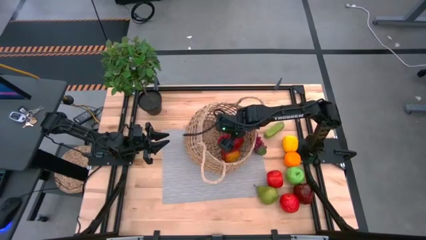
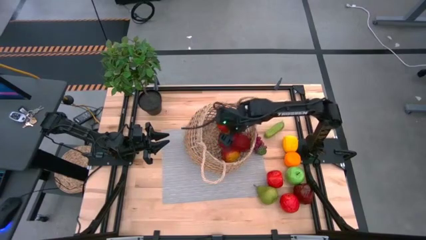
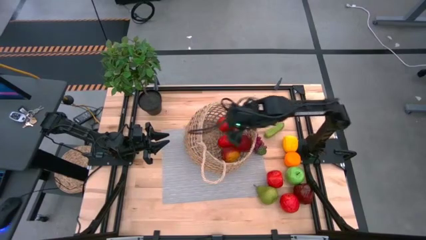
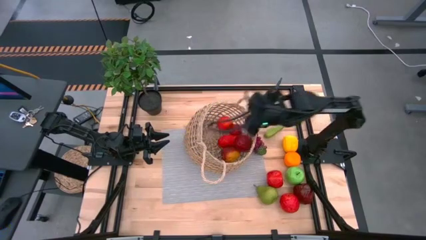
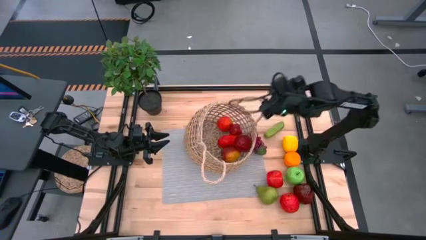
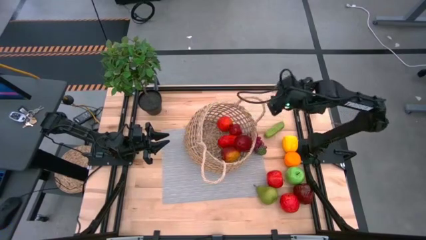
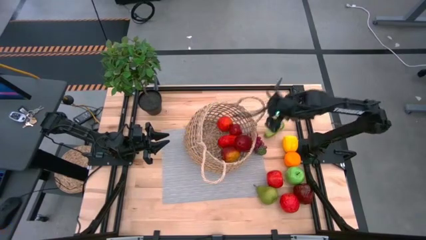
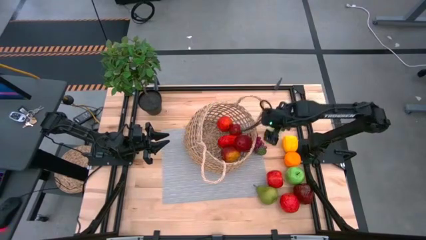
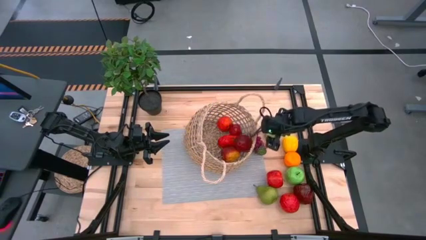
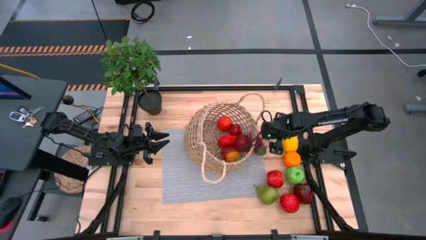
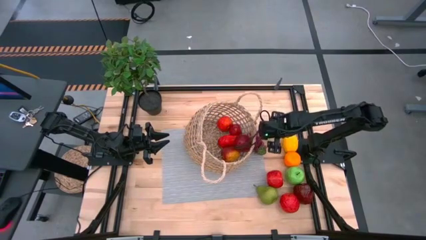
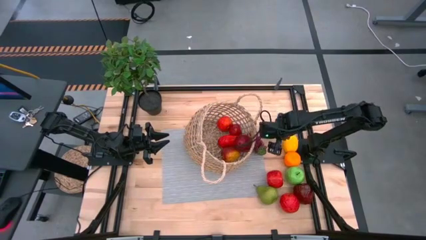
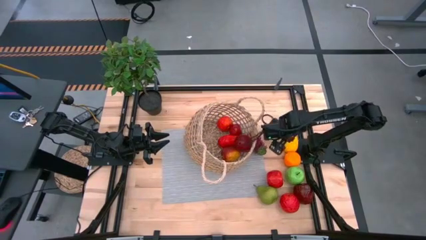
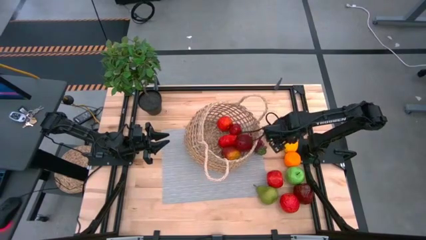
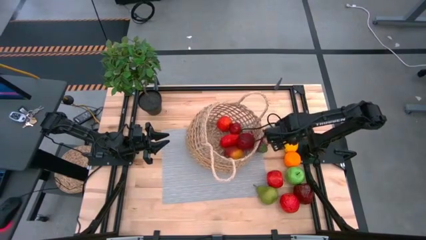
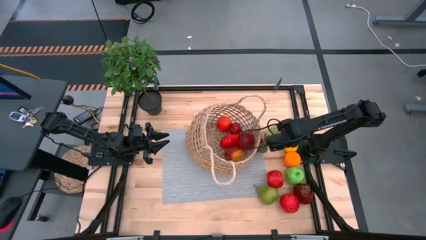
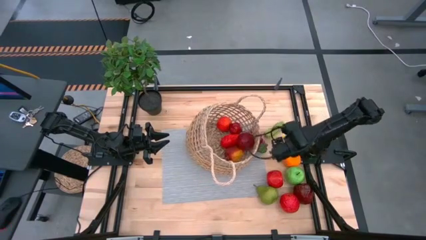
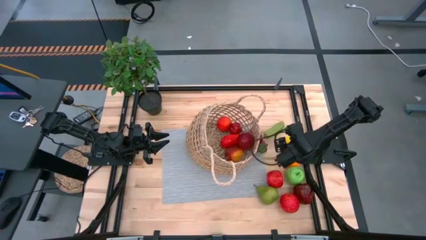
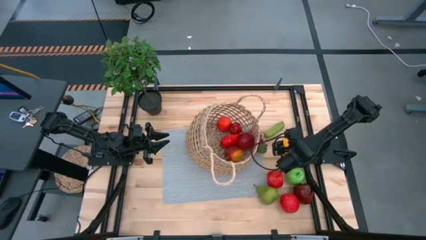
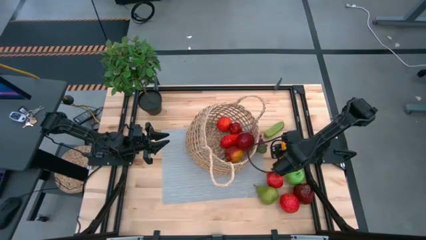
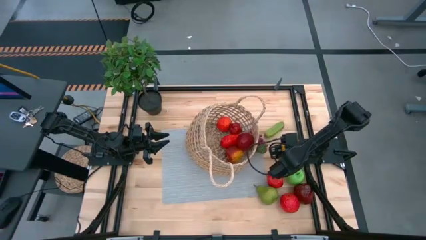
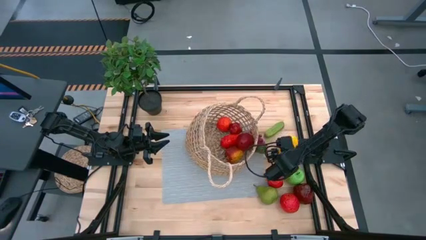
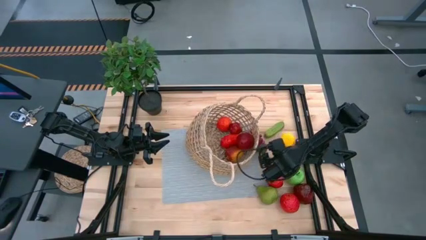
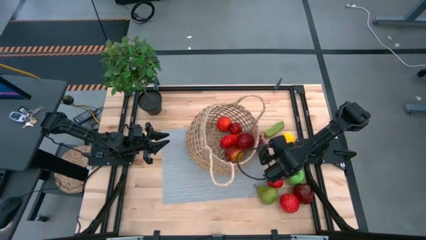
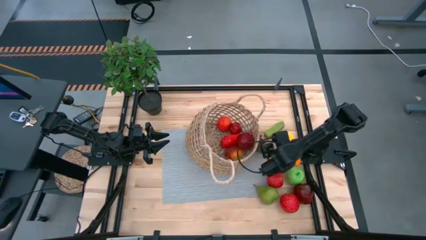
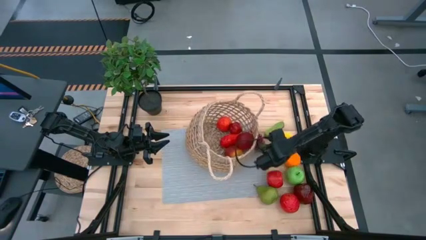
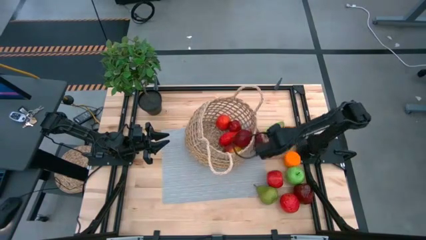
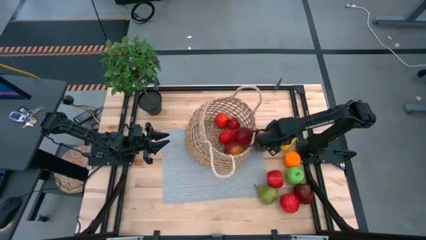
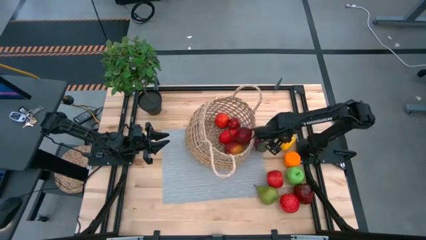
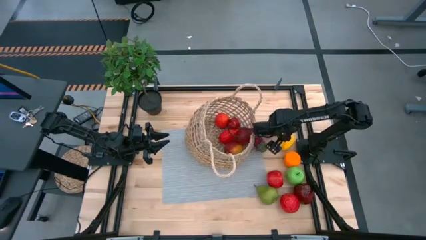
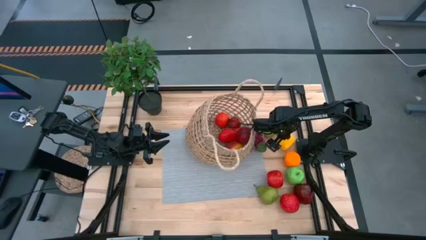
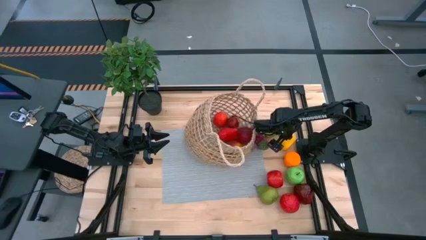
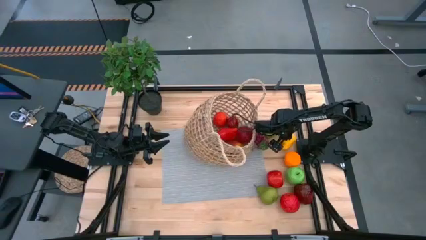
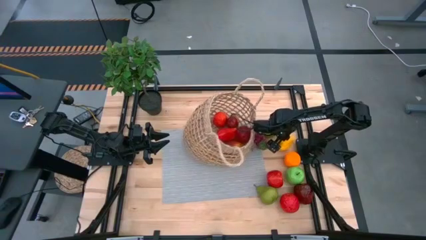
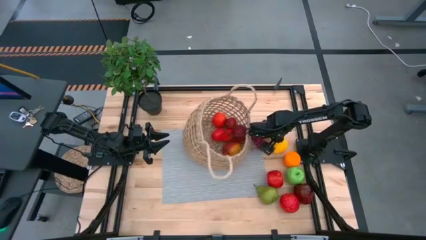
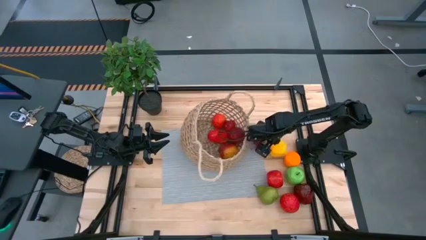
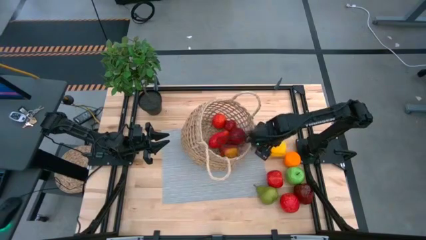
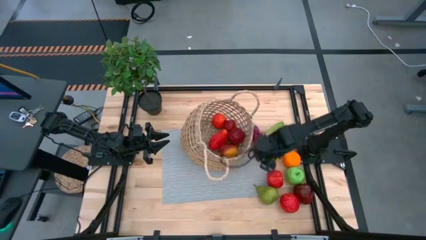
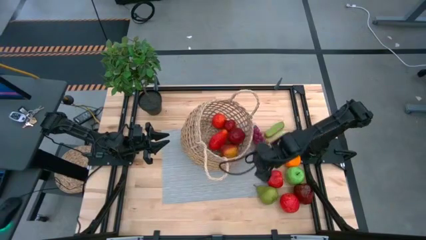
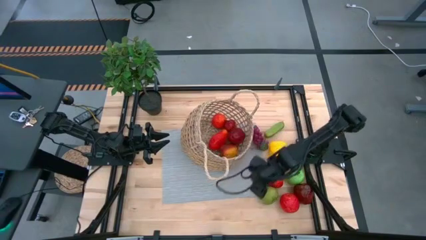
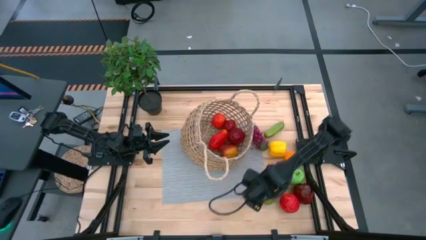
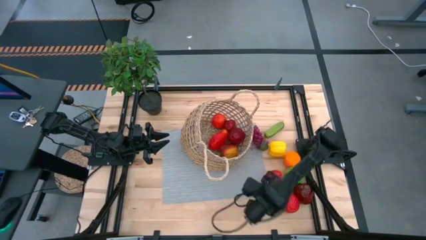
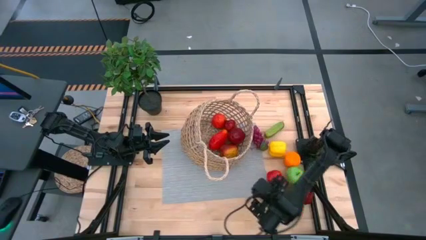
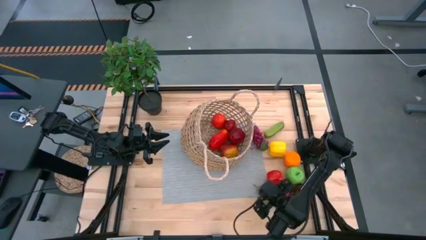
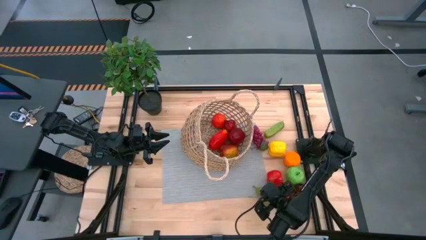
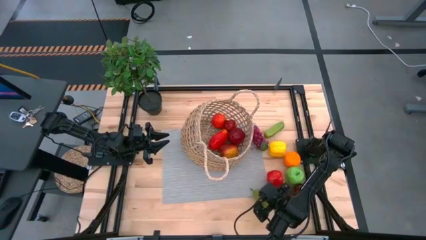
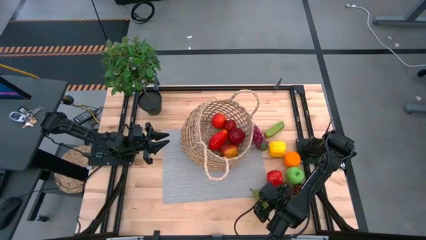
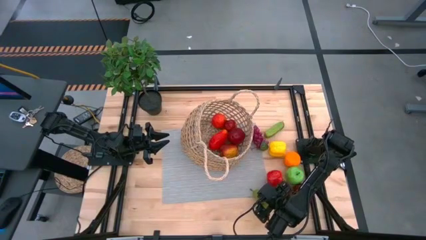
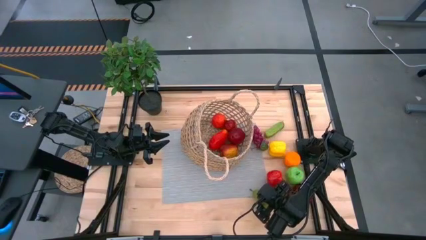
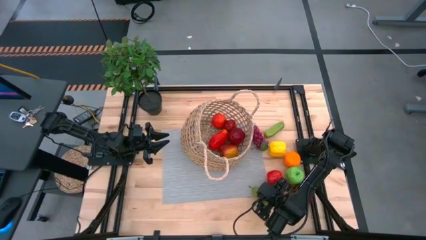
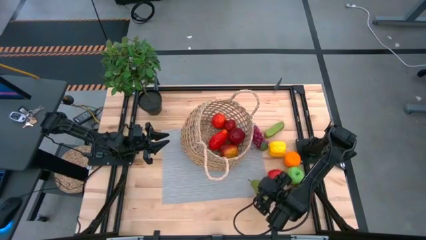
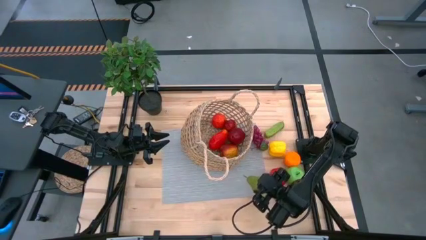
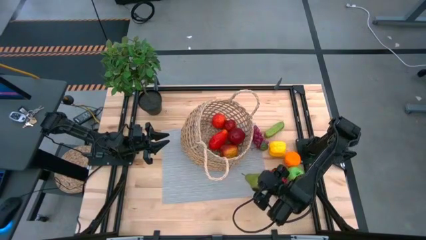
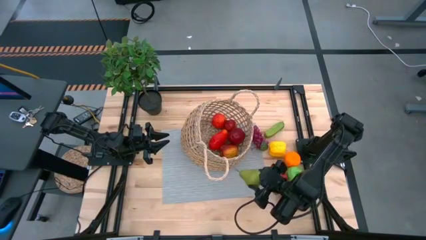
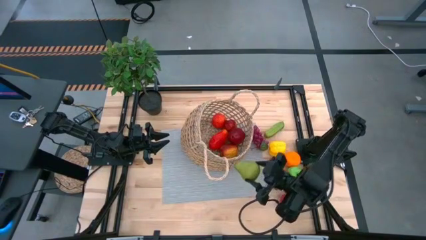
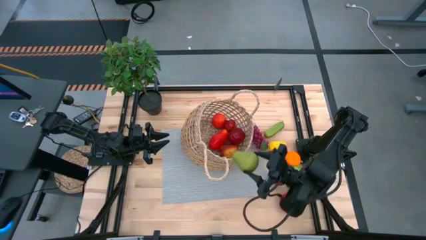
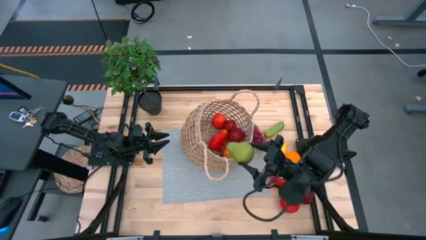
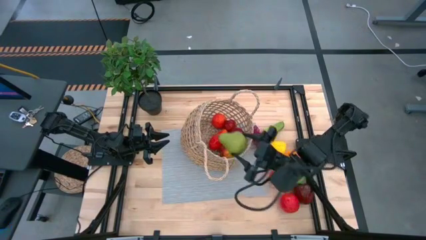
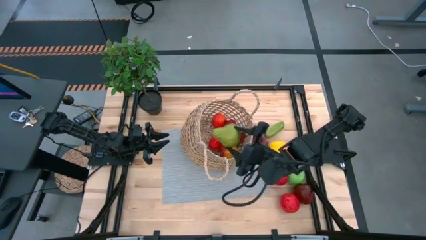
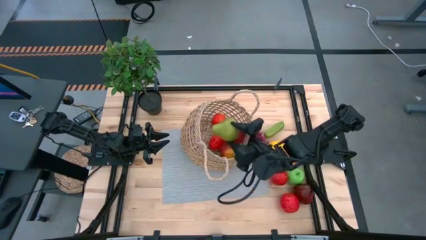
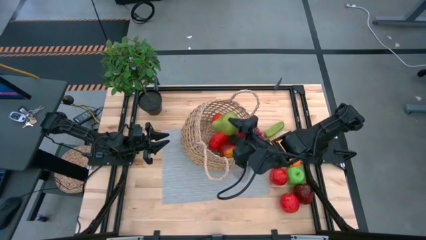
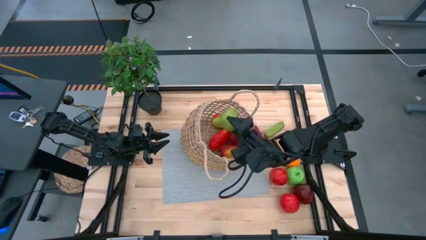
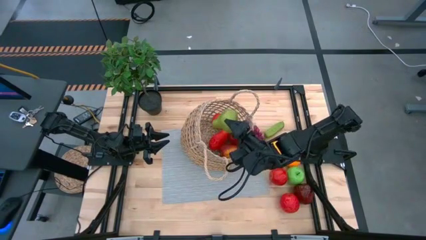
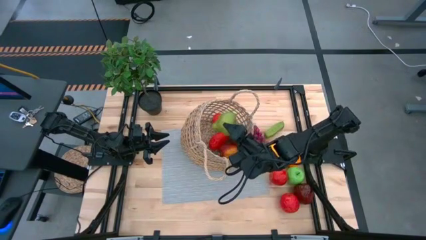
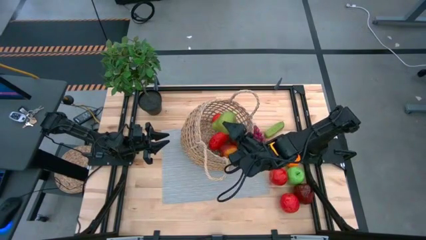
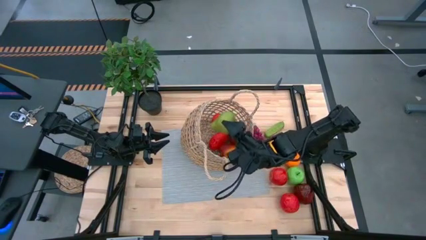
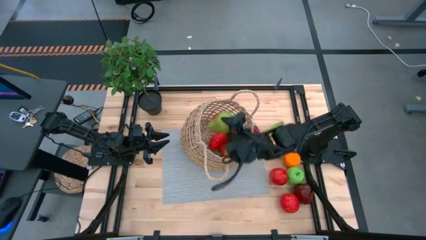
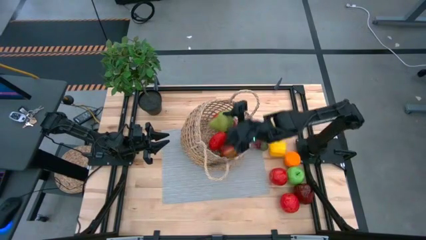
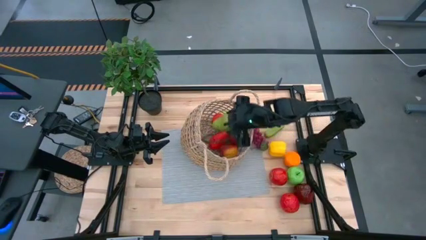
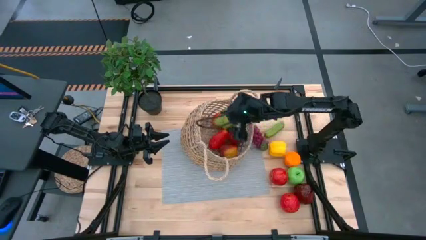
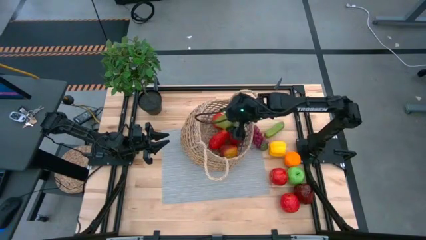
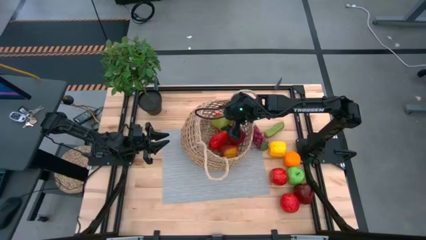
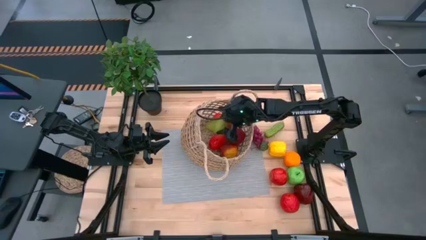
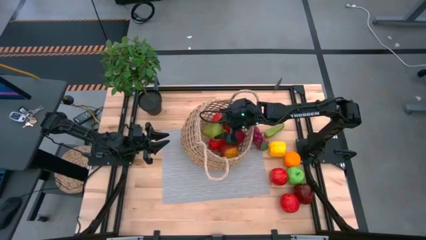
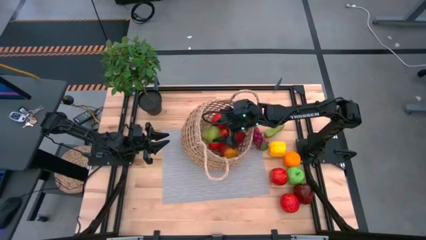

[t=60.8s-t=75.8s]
Task: Build produce basket
Put the green pear into the brown basket
